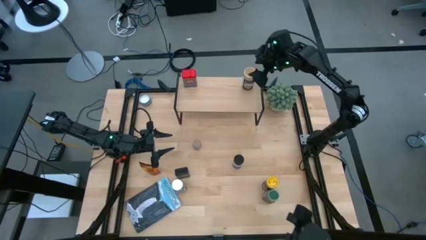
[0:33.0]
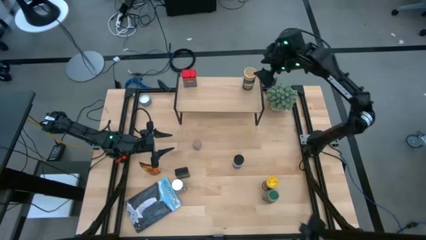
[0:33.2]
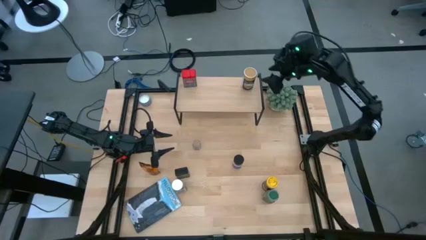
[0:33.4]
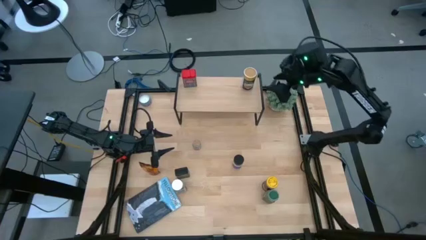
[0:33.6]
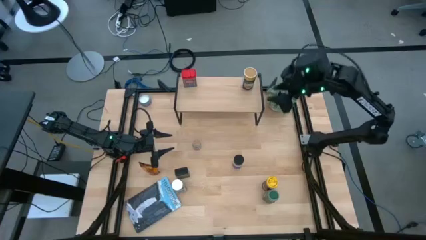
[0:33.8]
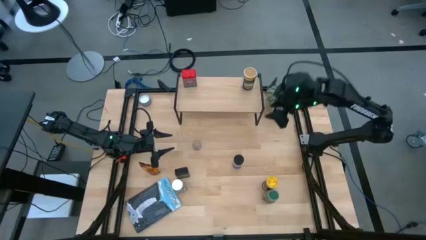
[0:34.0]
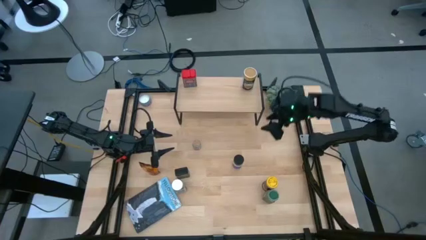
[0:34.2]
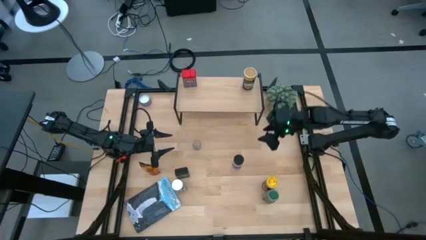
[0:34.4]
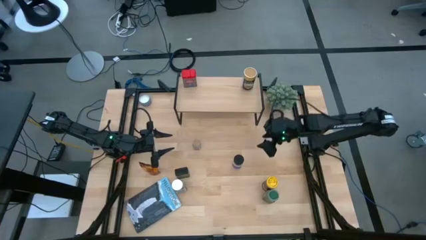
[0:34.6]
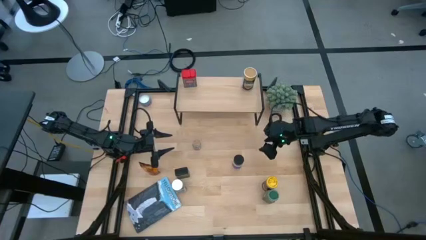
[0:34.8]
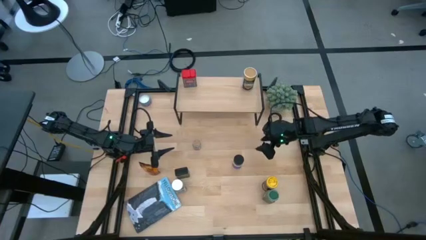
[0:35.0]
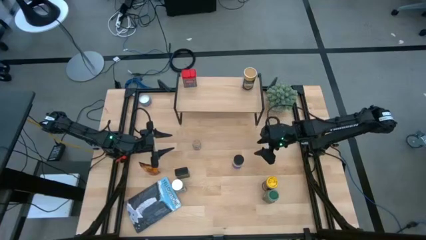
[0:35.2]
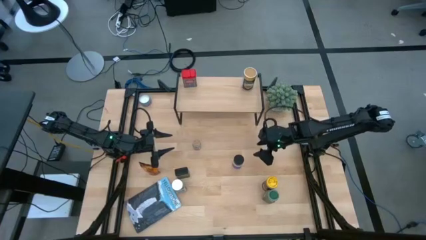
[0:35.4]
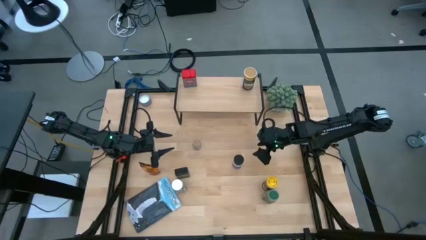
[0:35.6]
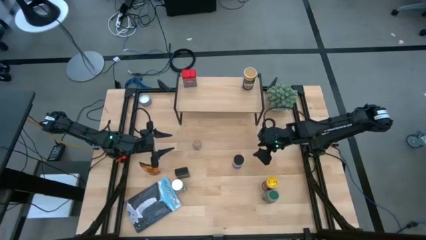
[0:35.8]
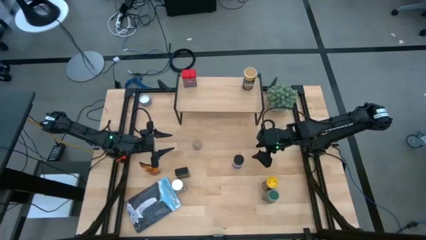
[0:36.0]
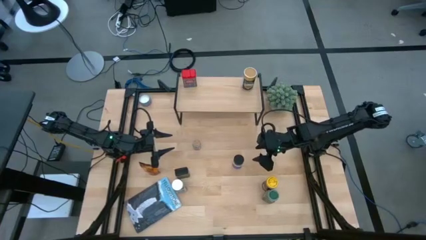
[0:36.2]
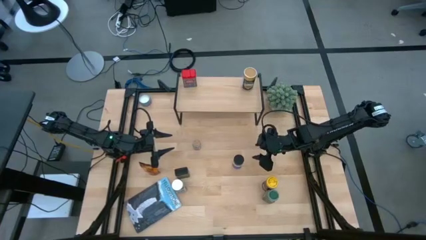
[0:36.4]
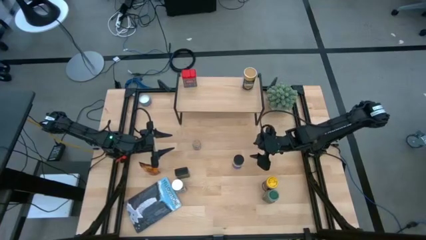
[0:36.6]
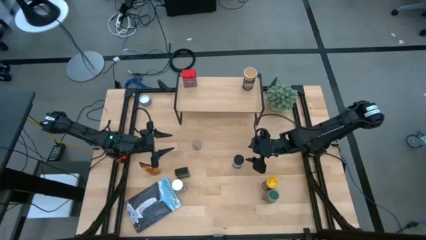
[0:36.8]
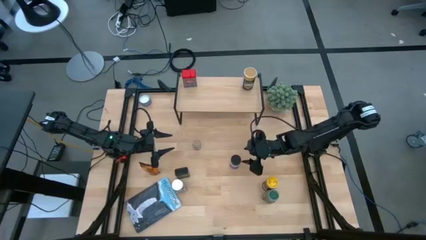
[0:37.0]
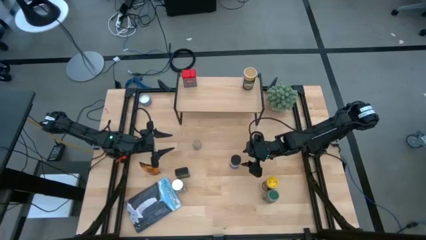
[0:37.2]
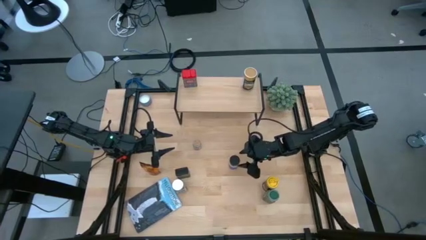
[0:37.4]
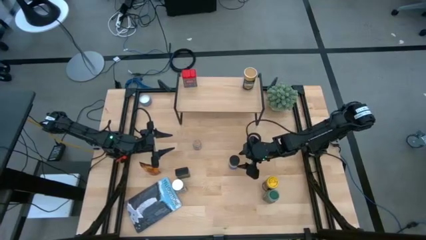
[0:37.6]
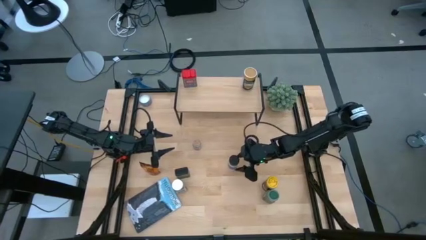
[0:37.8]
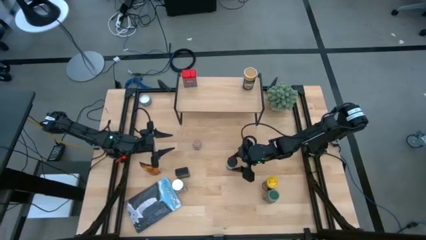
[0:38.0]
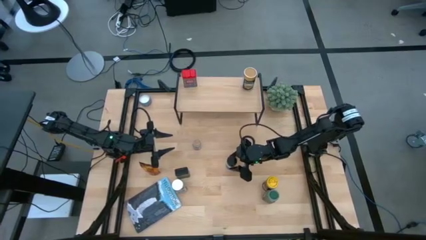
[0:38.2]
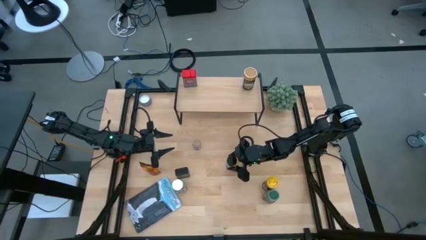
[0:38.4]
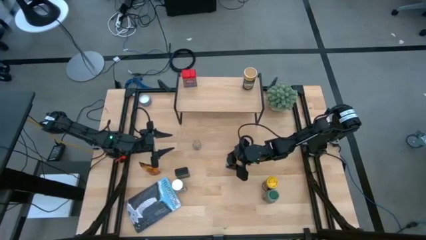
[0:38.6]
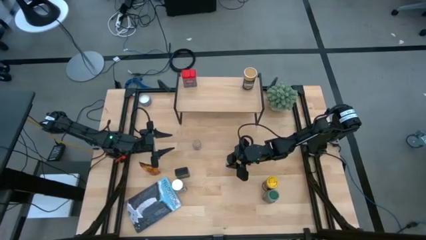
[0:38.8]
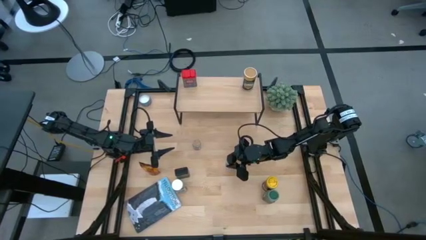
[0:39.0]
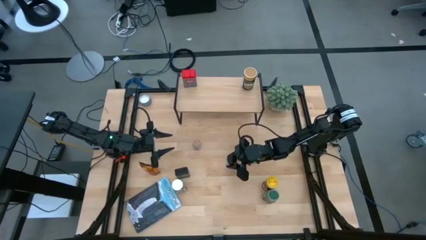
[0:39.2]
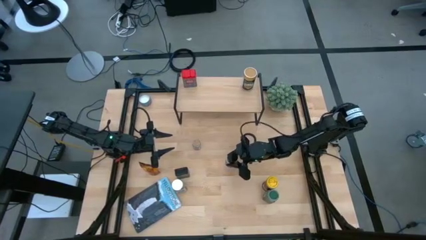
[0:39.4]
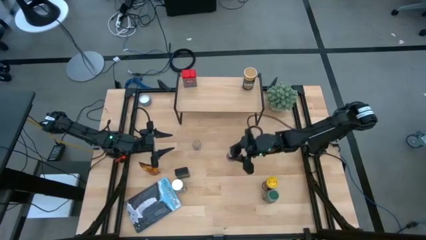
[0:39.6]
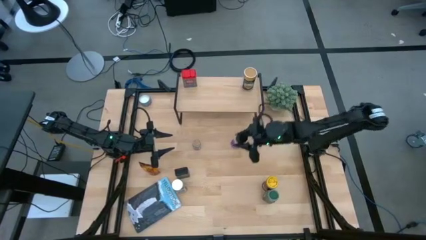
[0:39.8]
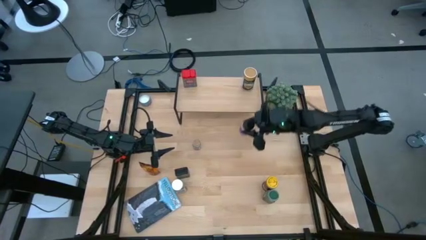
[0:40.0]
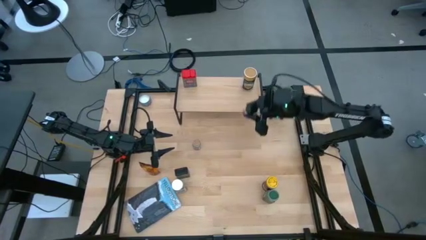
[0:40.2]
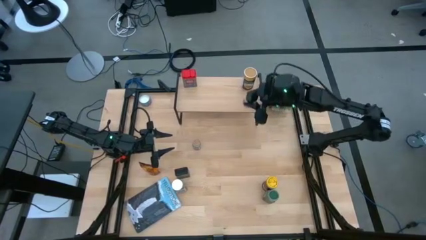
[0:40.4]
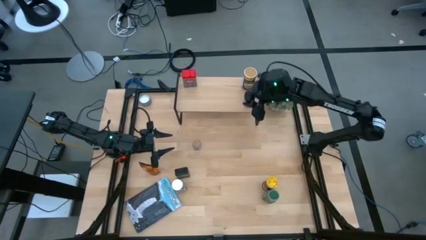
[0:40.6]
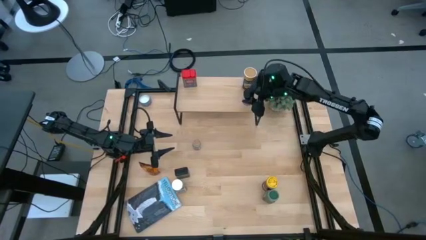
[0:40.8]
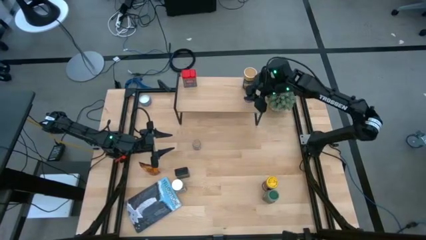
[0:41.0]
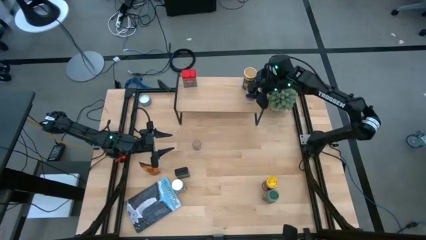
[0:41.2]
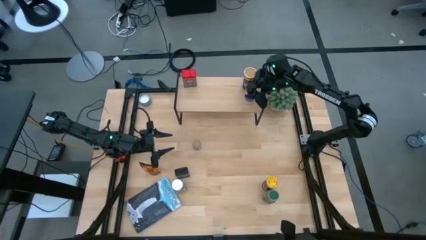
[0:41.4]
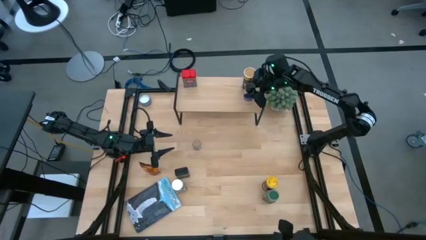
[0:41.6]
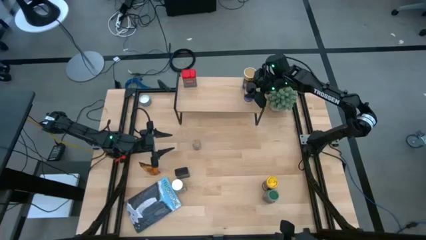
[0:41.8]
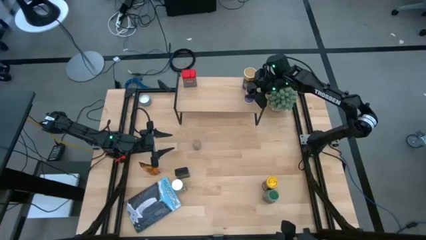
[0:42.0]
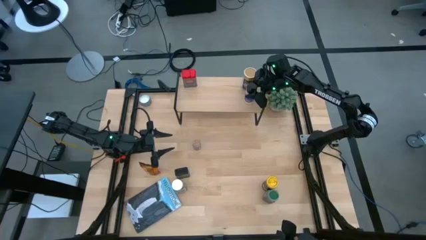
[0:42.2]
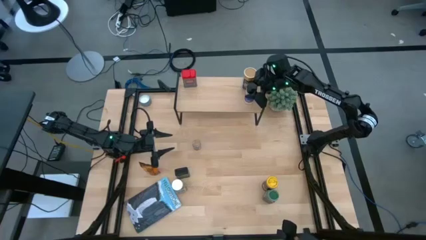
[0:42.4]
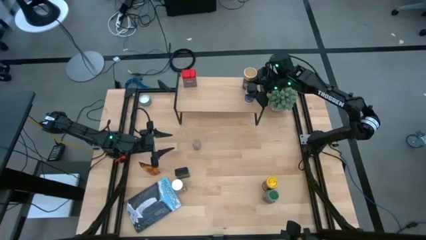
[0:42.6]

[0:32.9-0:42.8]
Task: Shelf spices
Put the purple seasoning on the shelf
